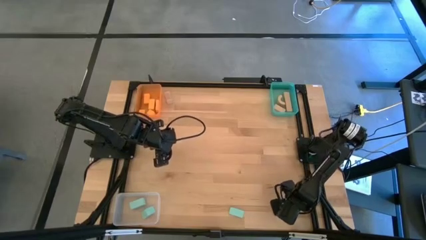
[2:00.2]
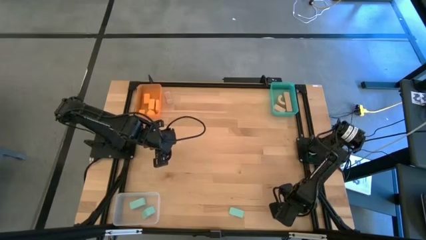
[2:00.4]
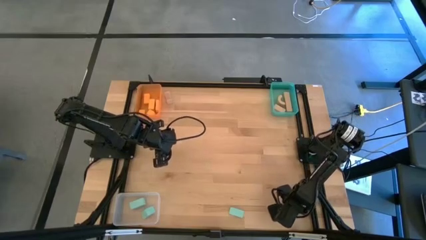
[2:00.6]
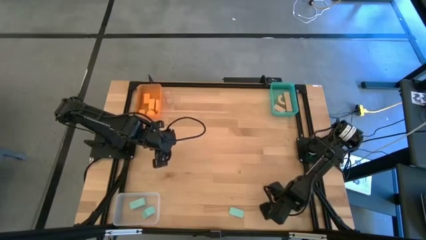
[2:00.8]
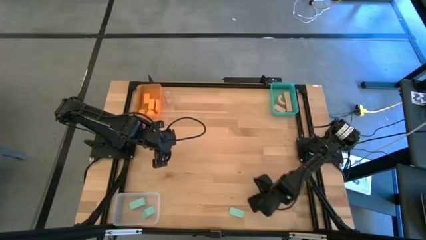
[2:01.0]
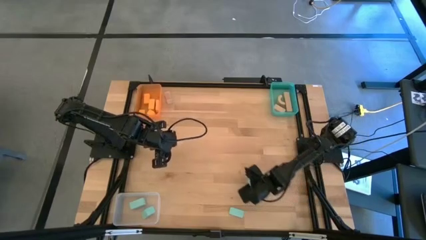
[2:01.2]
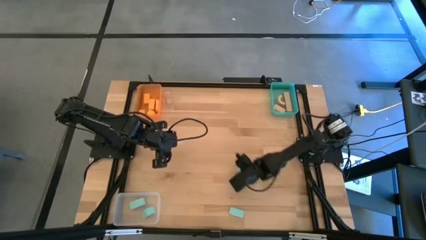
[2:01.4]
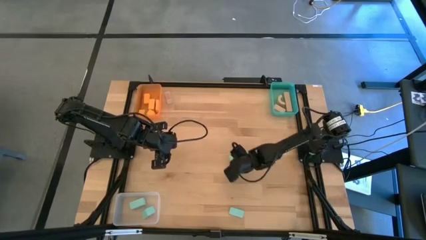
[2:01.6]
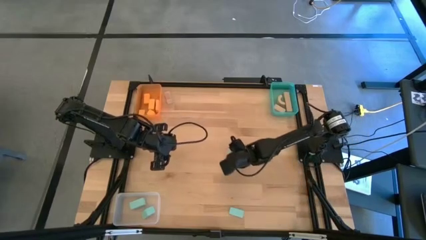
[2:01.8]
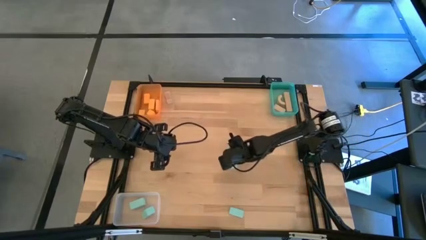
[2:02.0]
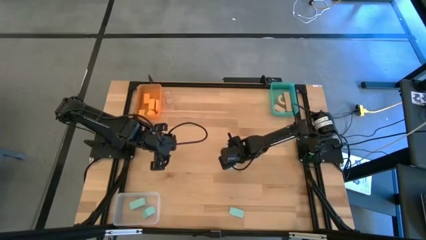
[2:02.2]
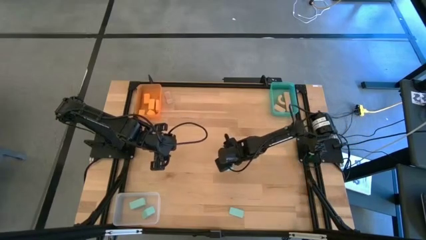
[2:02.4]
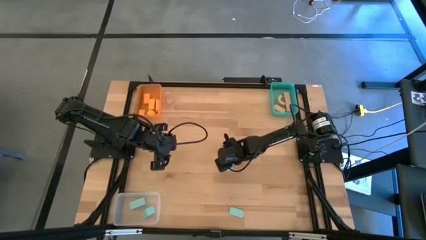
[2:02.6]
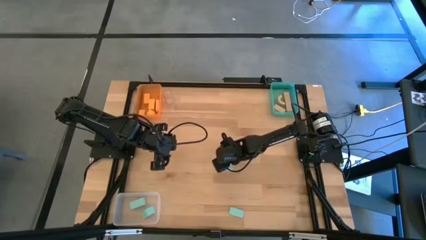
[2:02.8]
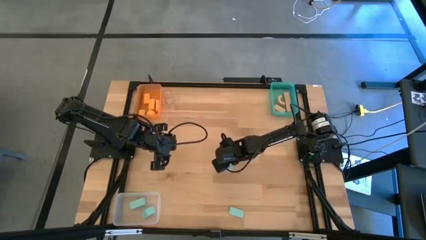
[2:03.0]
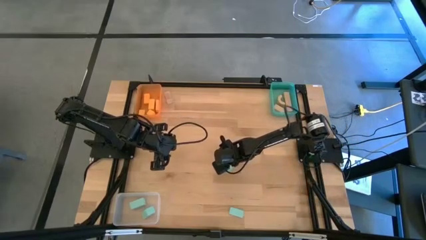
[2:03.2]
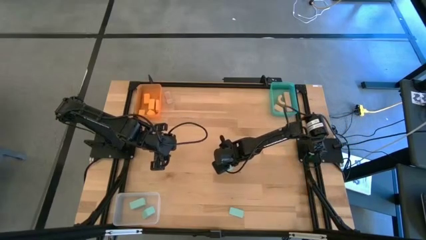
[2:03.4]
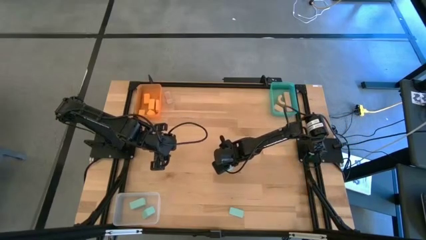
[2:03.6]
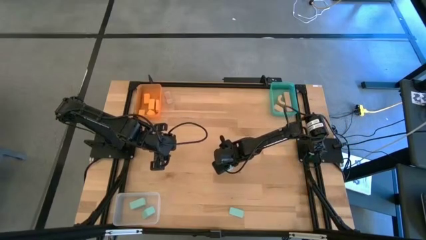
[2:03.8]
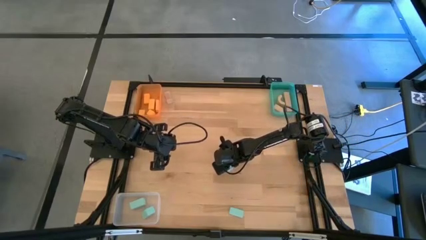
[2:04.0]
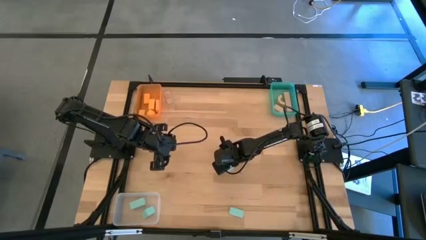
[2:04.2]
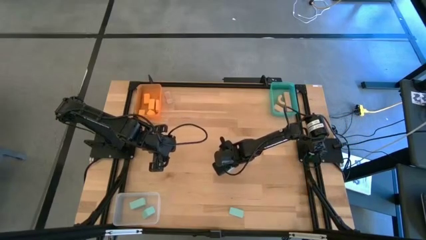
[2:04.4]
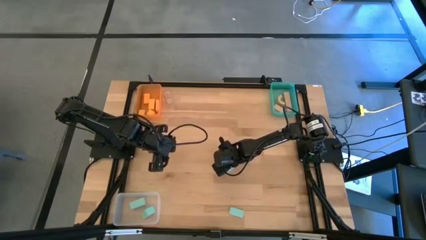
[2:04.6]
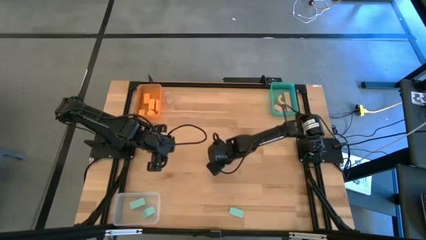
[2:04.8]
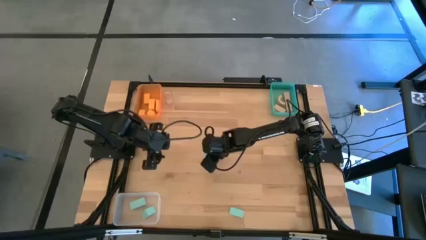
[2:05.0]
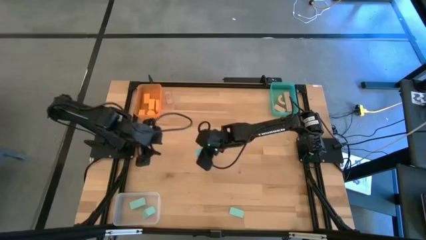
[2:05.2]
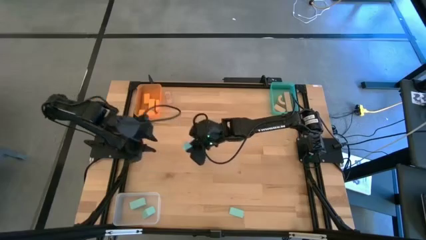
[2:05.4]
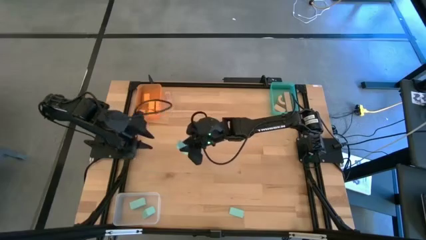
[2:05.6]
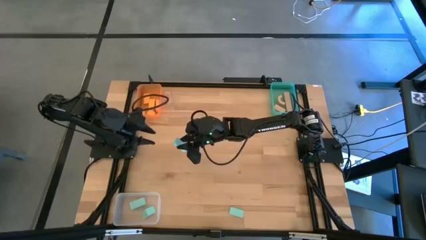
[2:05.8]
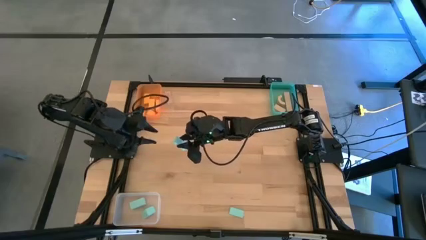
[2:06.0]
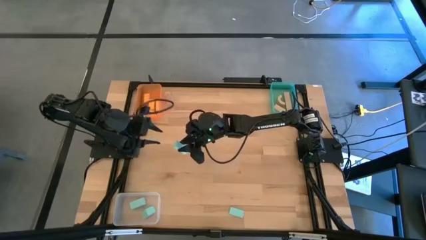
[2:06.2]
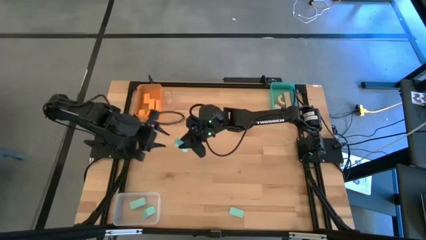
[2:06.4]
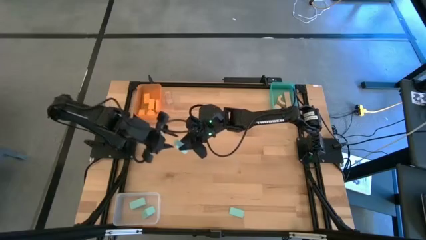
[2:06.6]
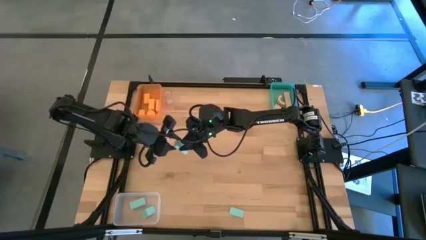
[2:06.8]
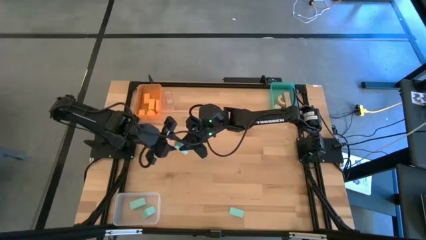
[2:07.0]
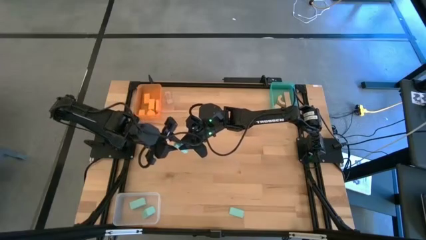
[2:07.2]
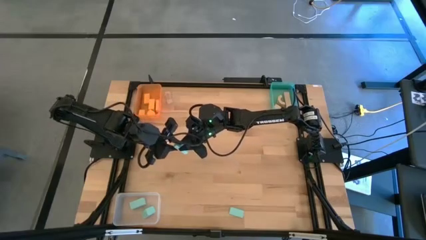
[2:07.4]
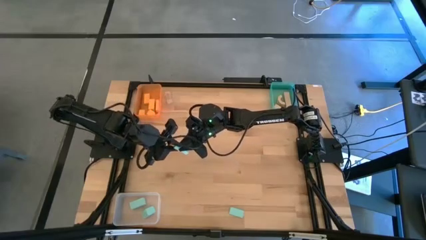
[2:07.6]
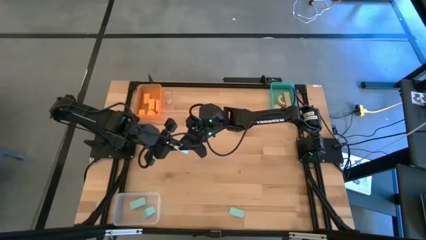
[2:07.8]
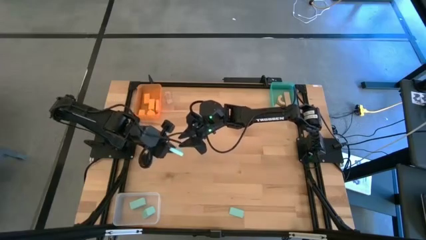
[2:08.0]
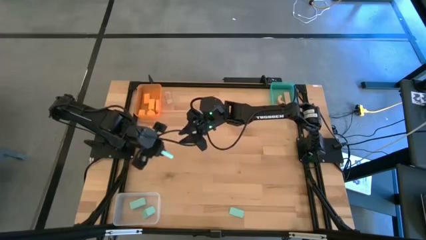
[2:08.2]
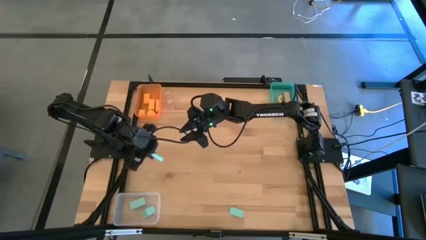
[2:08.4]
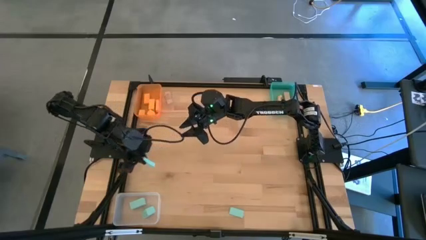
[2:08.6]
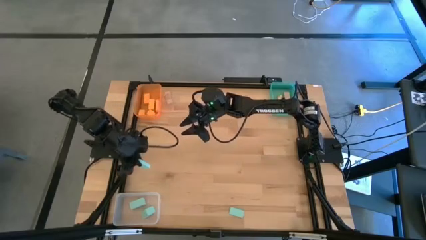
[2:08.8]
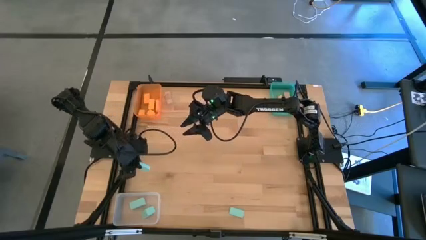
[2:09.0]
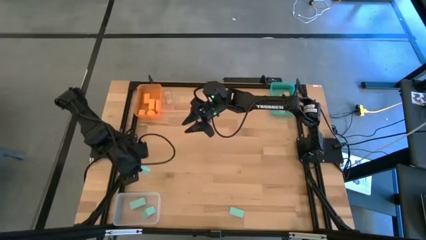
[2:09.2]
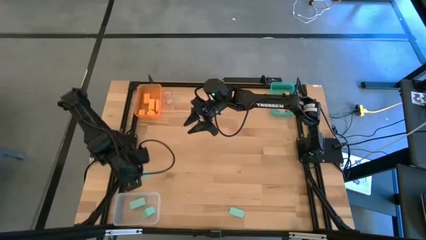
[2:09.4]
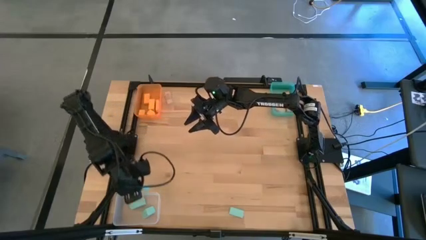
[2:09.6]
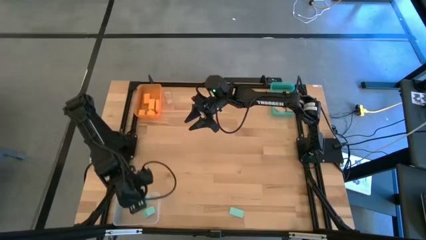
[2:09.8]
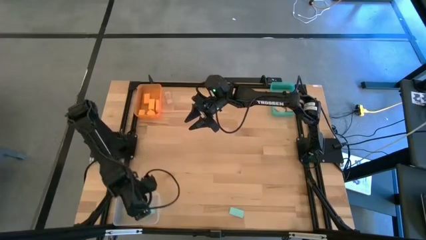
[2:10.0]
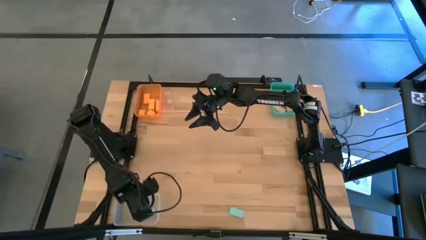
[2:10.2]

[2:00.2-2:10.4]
Task: Sort & place blocks by color
Put the blue block into the transparent bin

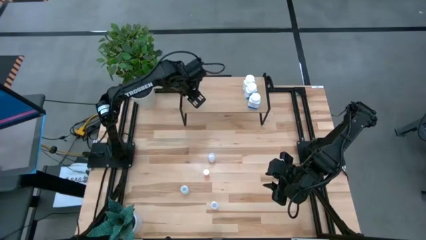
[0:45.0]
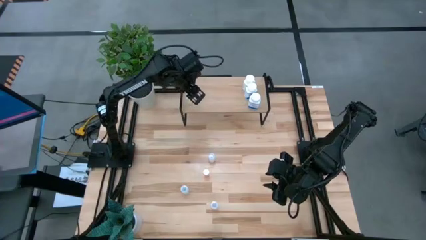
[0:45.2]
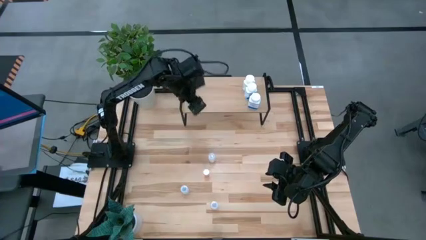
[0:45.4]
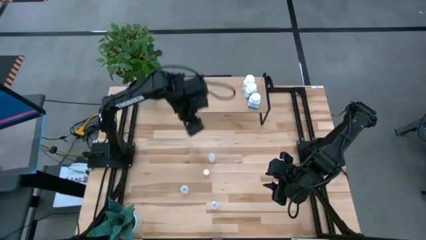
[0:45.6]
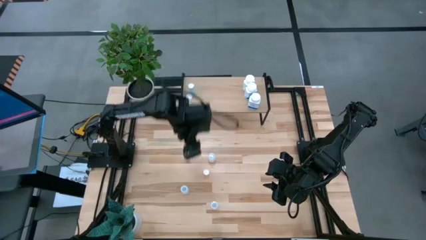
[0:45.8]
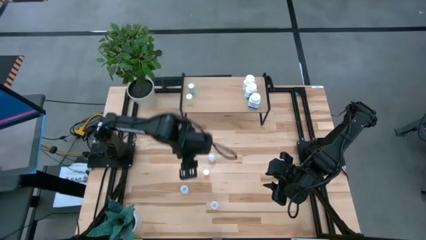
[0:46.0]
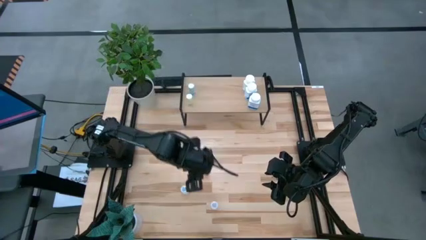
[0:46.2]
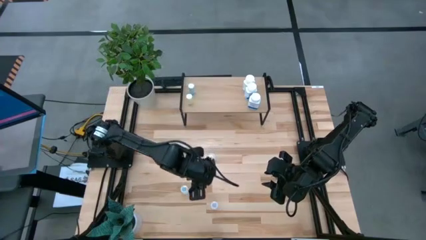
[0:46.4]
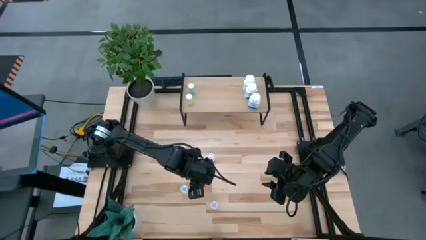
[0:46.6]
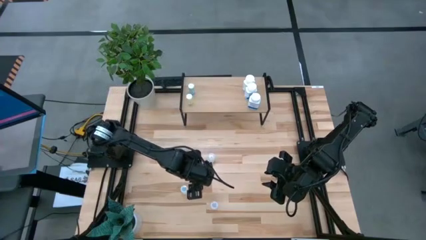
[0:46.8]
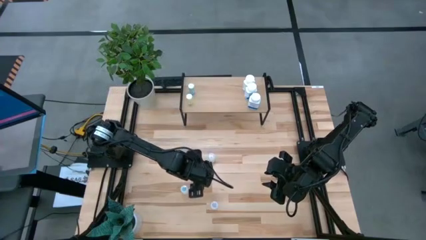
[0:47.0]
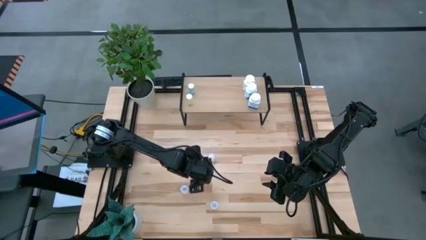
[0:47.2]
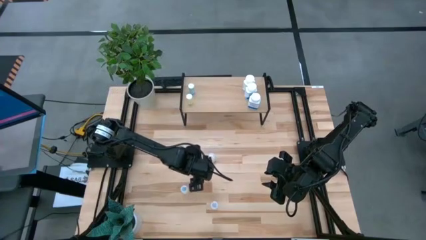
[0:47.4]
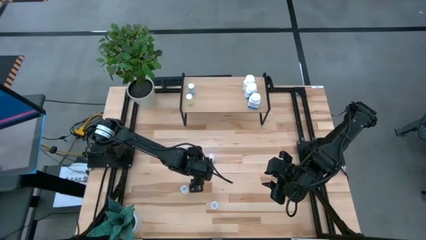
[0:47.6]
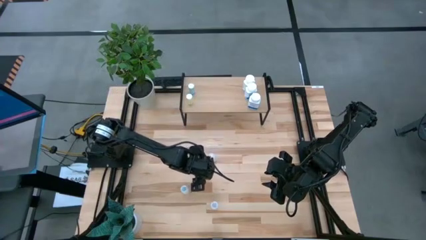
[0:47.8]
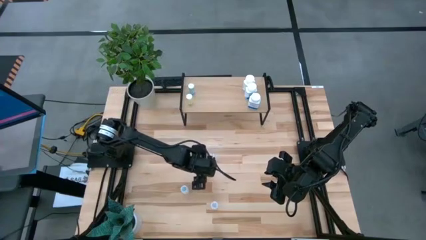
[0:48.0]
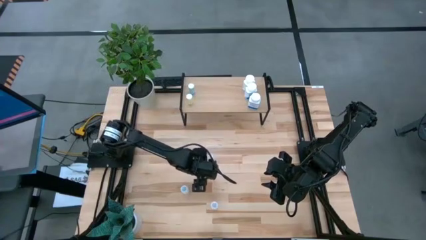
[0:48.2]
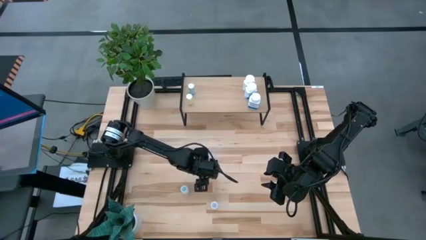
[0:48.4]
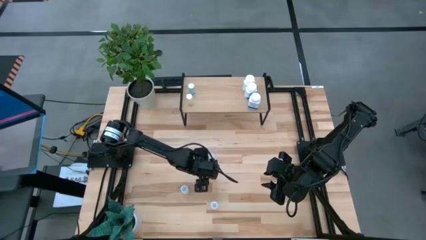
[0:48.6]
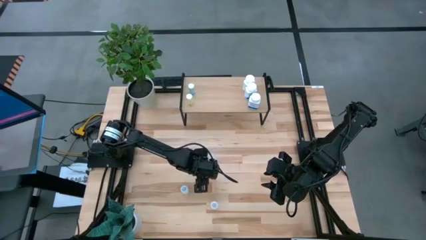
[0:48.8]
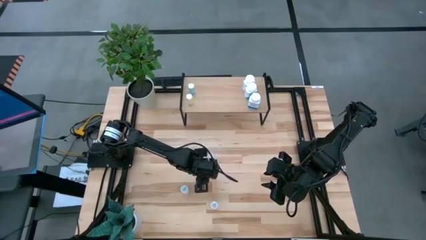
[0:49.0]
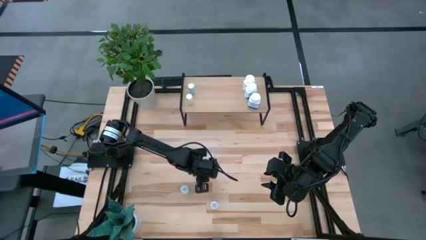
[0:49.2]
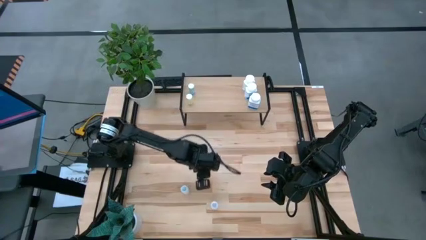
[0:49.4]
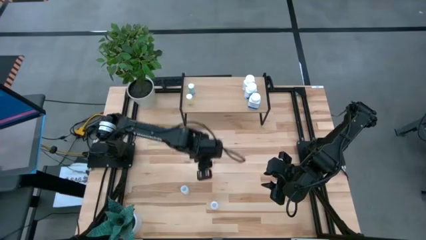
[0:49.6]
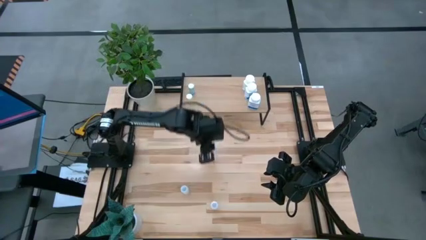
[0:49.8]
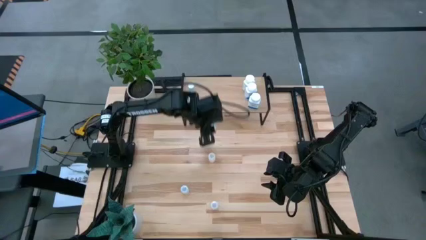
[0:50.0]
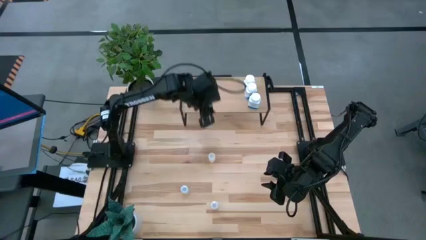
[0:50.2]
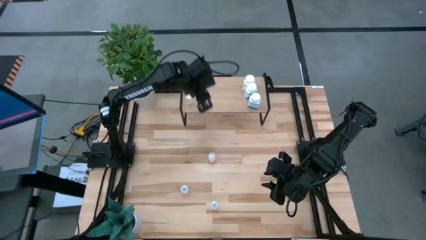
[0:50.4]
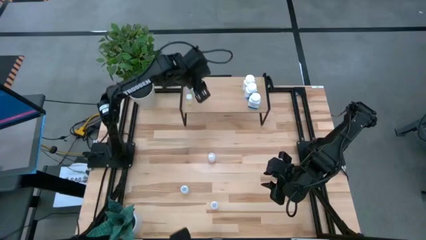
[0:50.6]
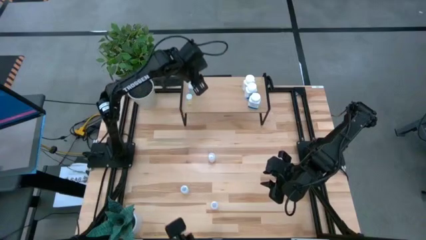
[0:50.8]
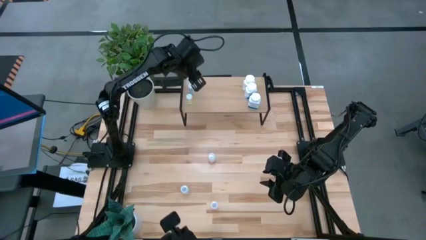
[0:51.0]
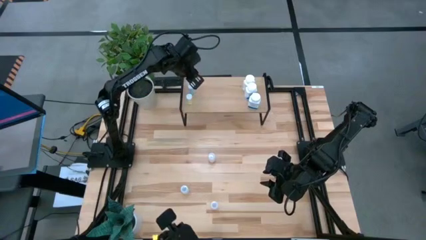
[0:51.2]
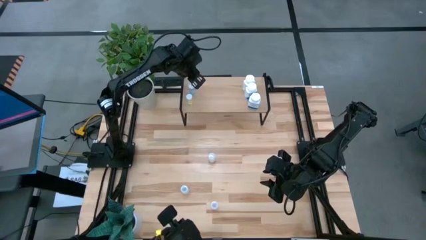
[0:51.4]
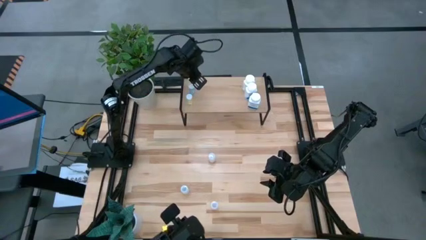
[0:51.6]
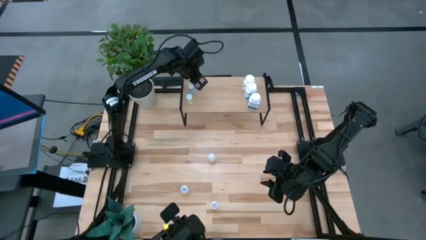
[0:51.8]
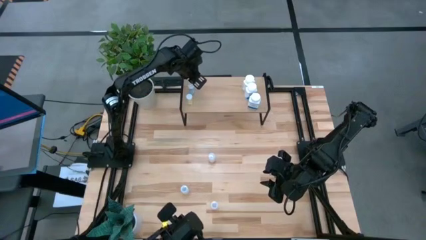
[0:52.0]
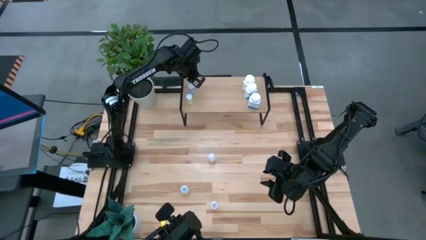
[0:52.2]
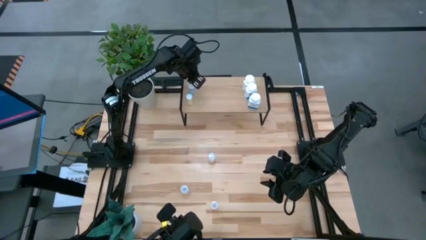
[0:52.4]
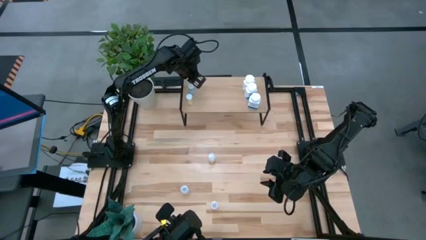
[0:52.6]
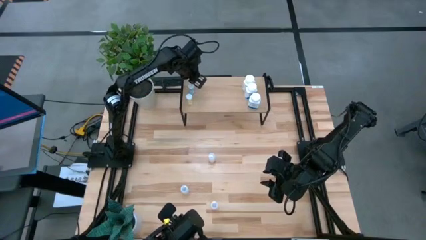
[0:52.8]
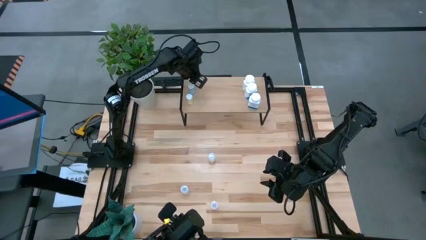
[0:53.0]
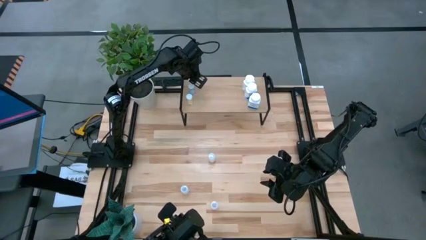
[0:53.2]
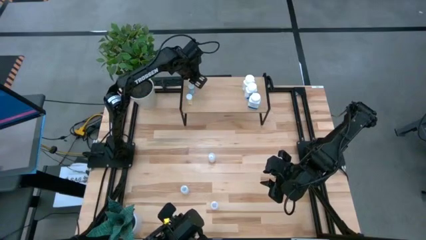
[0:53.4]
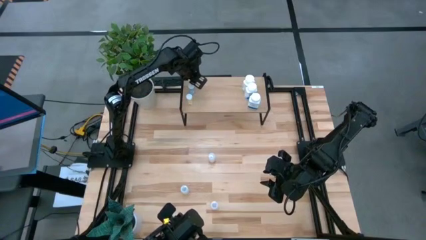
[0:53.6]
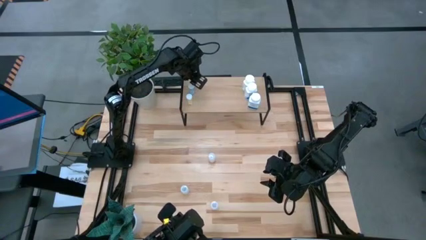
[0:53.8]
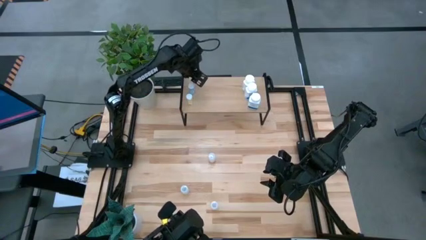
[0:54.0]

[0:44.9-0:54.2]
Task: Pick and place medicine bottles onto shelf by color
Put the pink pill bottle on the shelf
